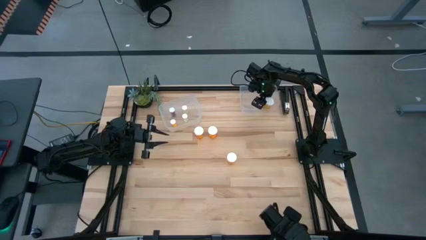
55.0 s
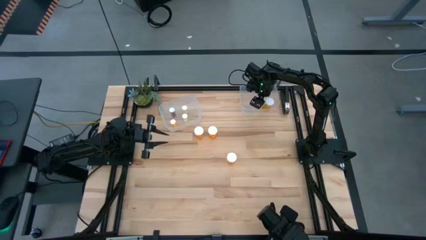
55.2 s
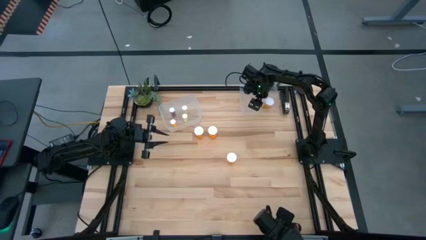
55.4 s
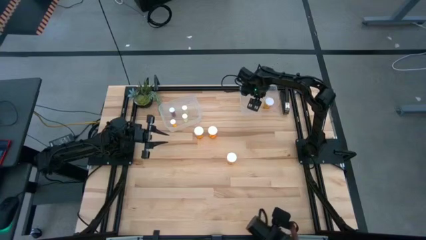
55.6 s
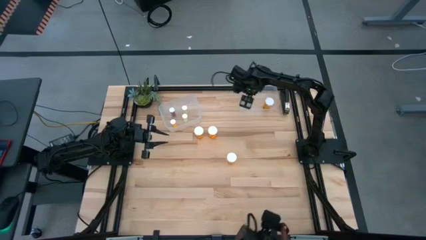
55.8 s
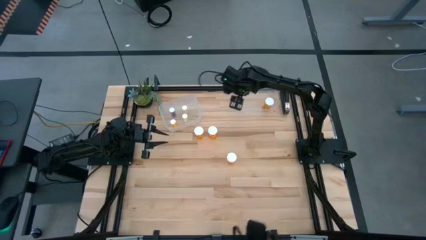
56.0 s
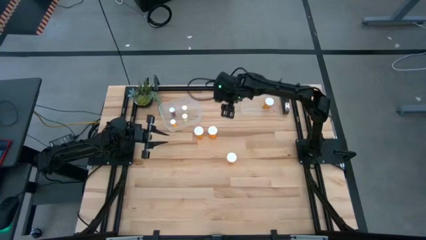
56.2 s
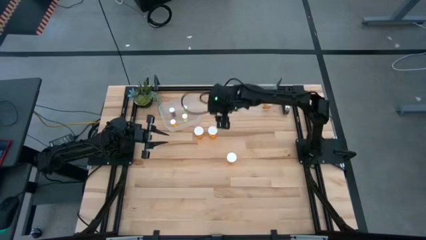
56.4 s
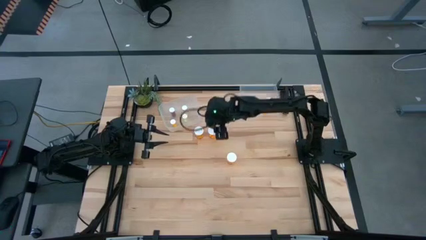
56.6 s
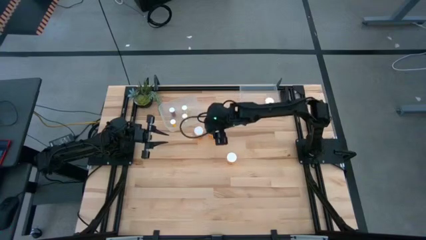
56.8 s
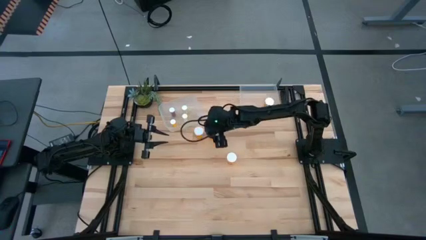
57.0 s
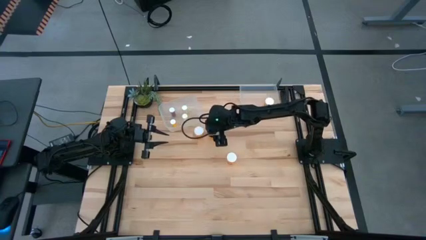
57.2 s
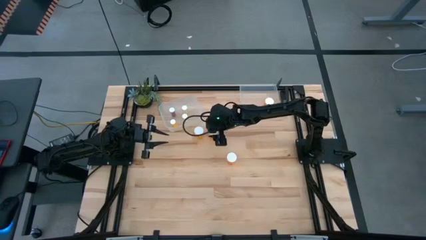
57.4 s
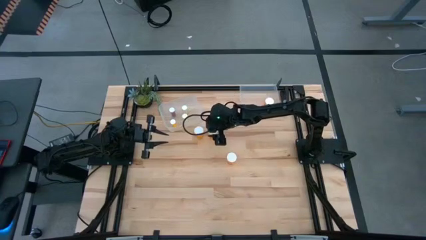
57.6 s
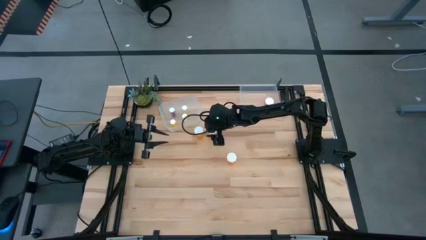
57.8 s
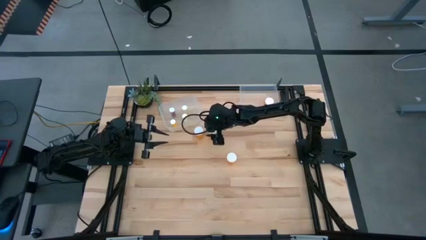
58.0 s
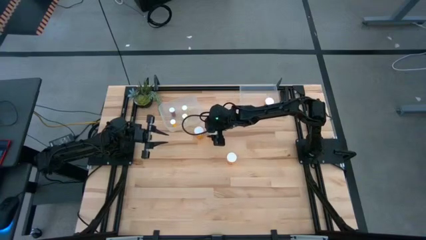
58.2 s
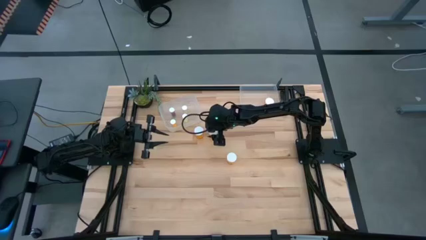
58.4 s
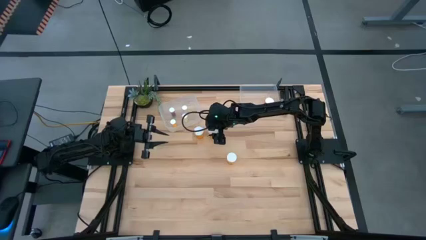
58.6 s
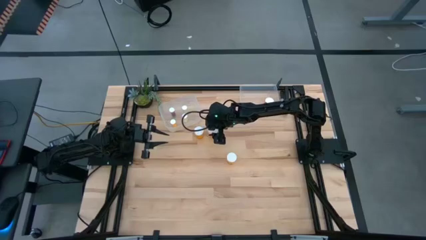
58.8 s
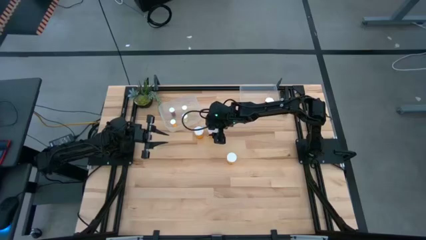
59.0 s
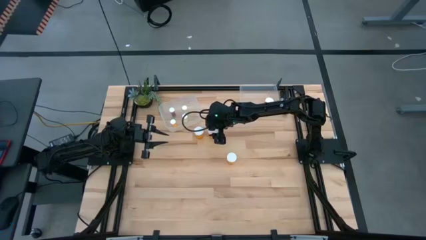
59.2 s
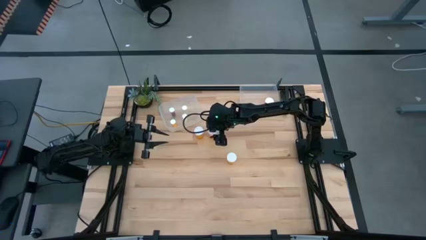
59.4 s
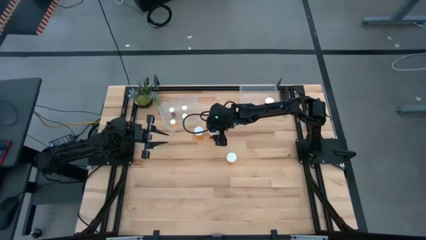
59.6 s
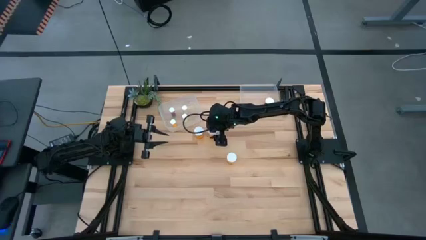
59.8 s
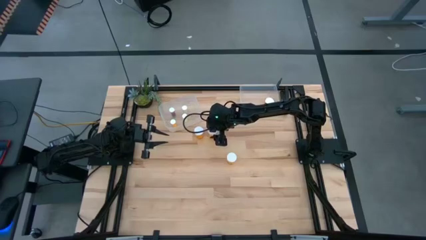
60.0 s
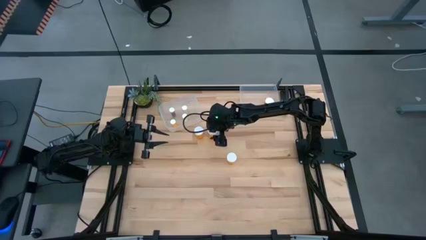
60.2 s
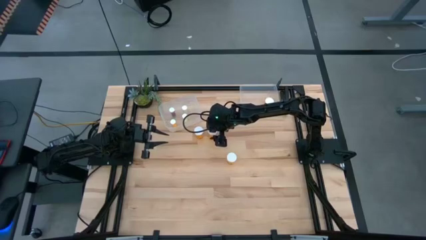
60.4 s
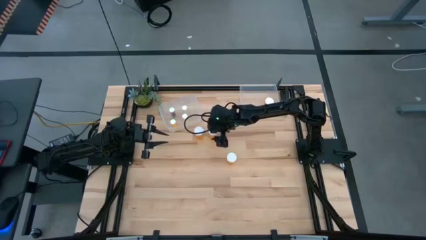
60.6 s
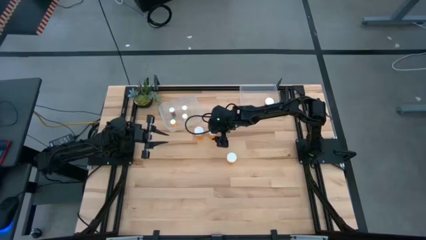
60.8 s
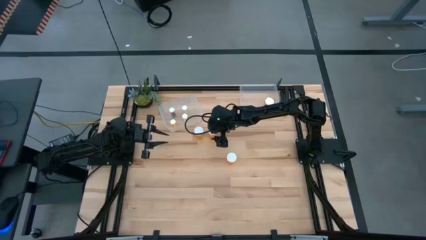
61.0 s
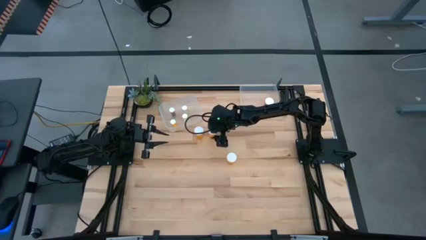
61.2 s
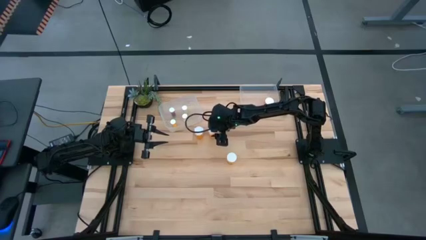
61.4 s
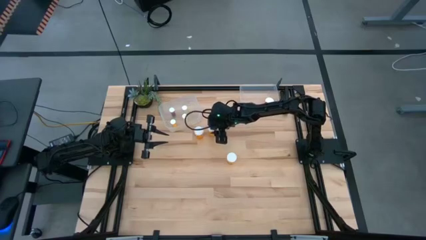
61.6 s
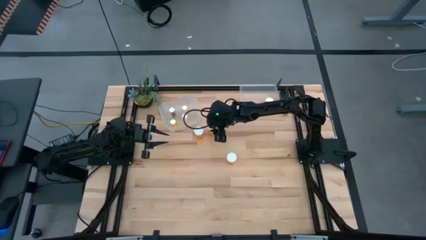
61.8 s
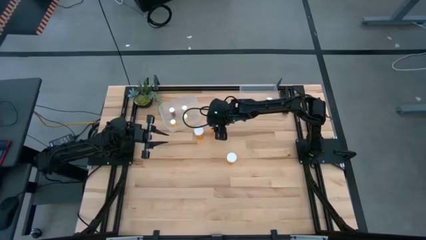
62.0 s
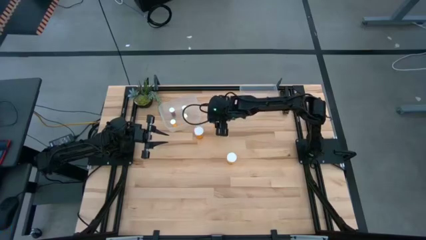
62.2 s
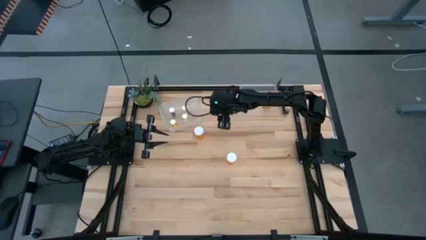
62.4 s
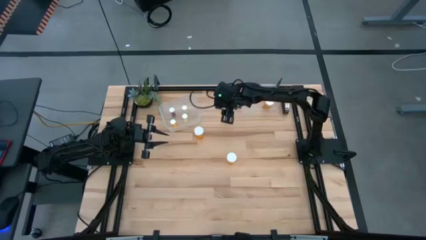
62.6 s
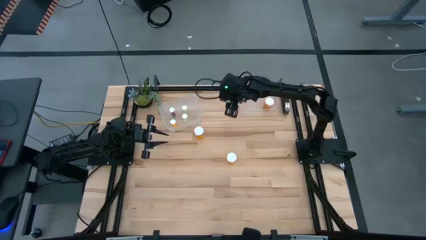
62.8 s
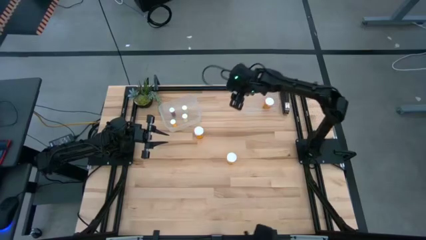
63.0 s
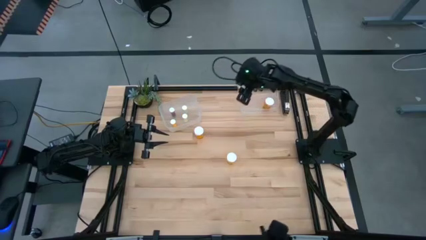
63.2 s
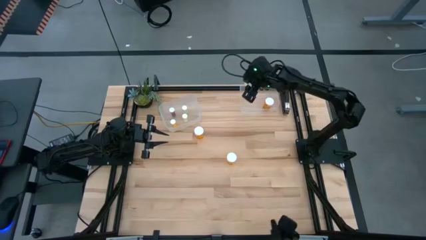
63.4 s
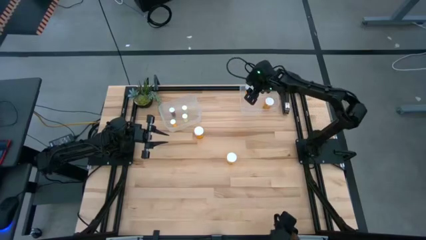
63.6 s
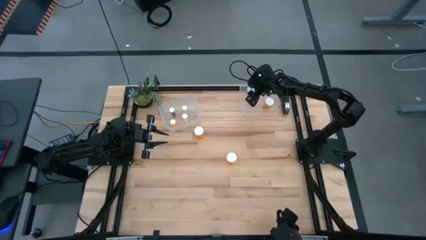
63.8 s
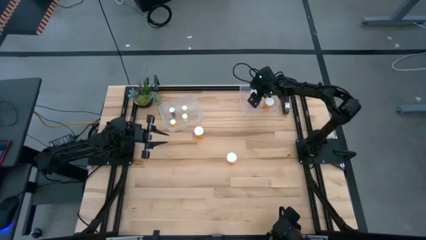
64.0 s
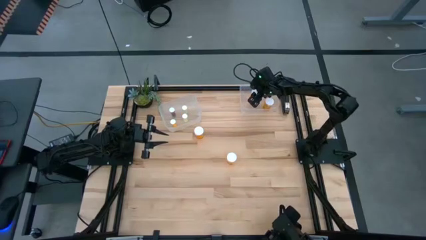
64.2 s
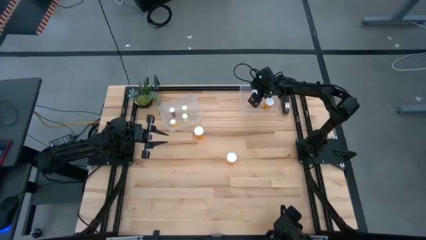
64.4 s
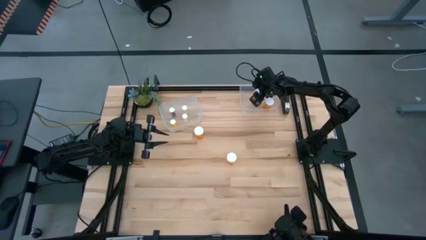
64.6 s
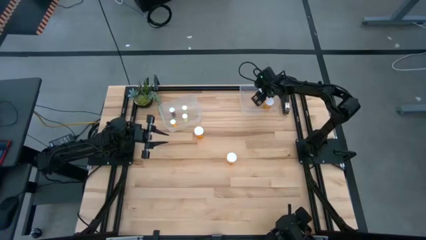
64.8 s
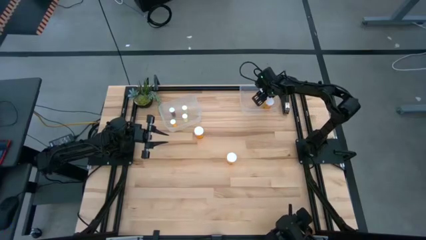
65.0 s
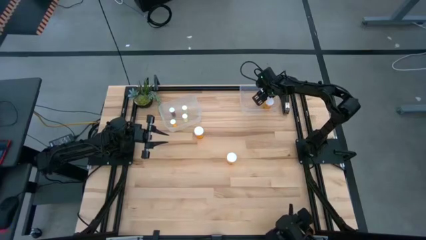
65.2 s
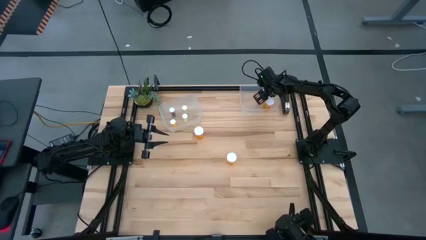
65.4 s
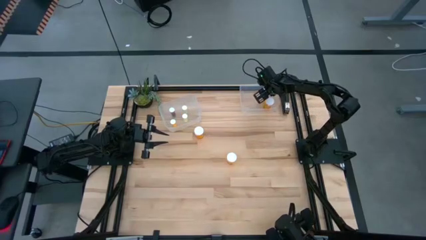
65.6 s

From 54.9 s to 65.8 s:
Task: Pick and place medicine bottles into bin by pill shape (circle, oval)
Put the orange large pill bottle into the right transparent bin

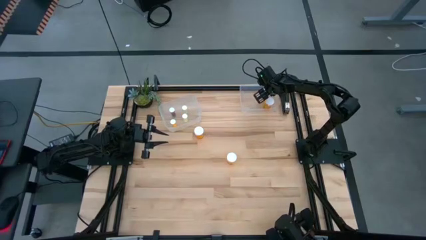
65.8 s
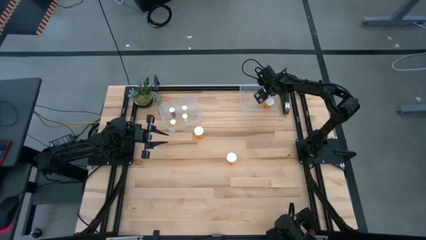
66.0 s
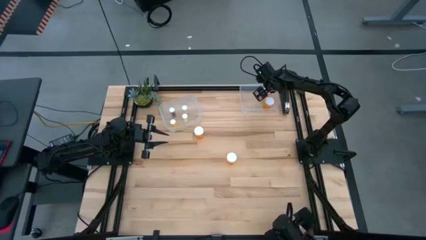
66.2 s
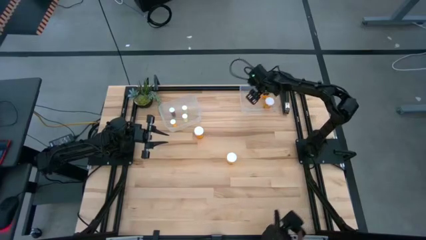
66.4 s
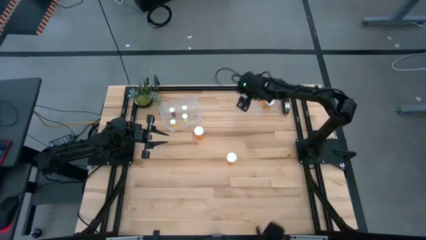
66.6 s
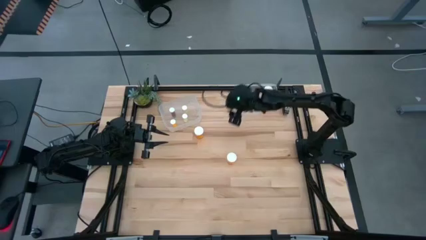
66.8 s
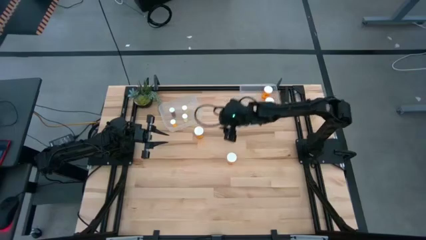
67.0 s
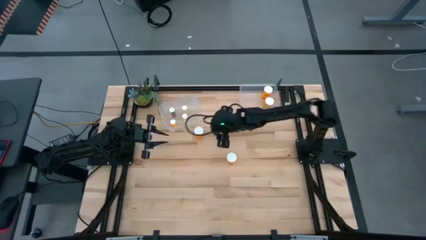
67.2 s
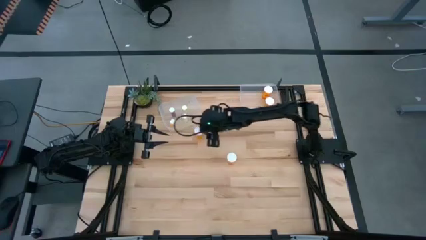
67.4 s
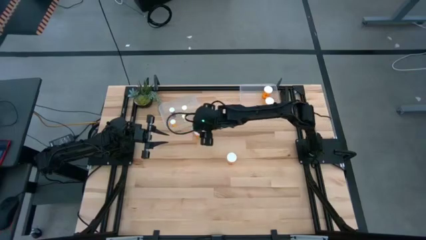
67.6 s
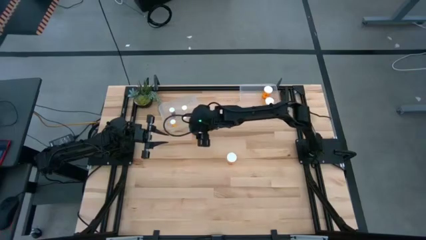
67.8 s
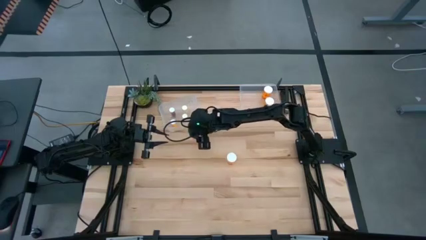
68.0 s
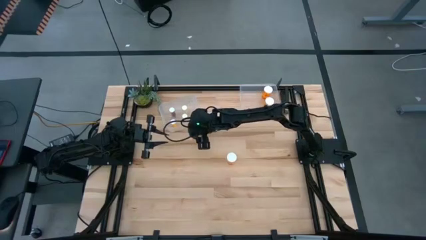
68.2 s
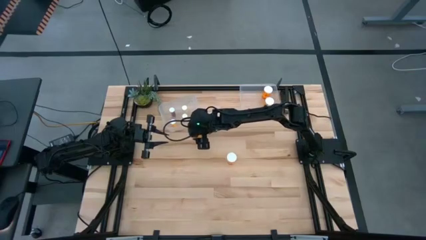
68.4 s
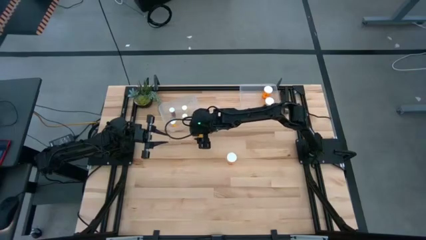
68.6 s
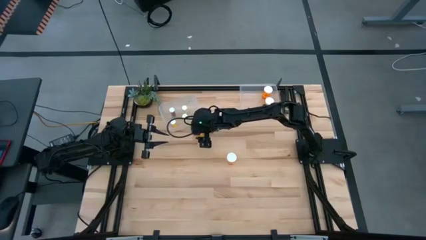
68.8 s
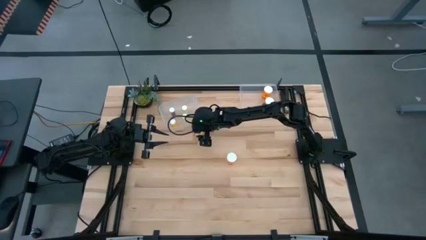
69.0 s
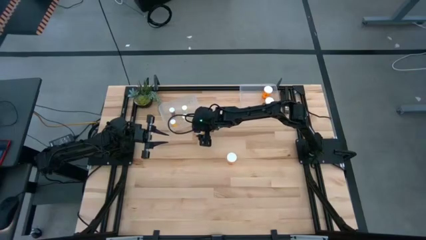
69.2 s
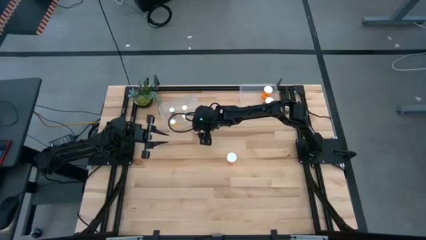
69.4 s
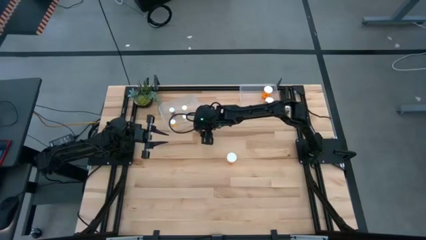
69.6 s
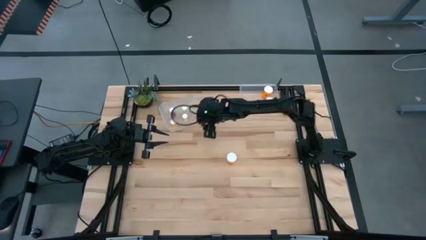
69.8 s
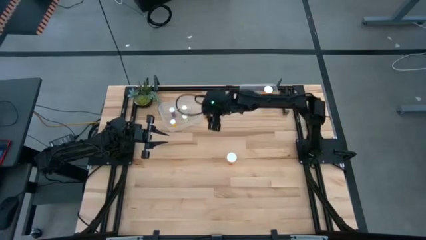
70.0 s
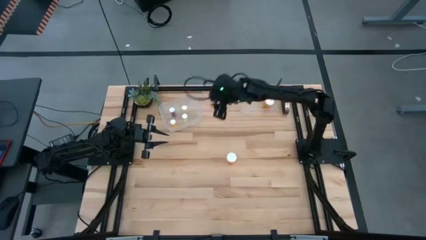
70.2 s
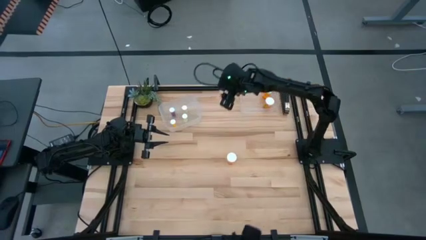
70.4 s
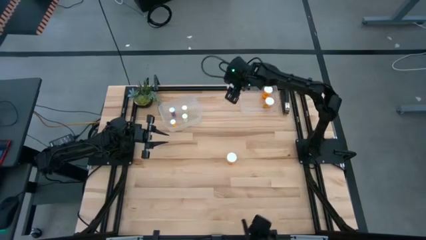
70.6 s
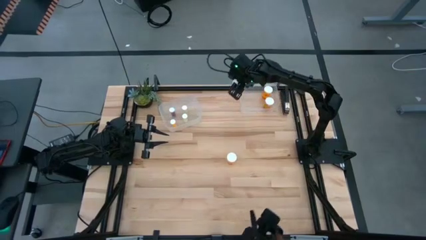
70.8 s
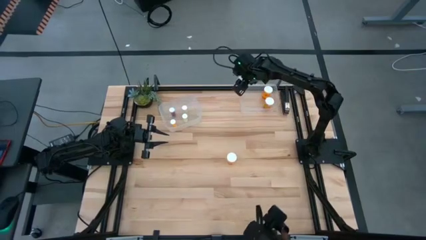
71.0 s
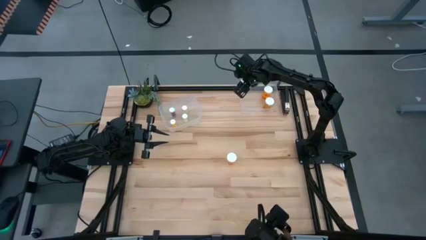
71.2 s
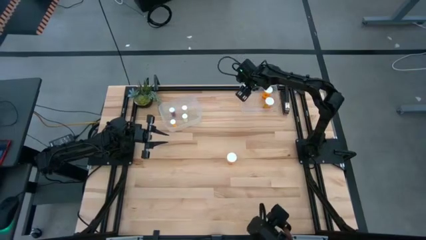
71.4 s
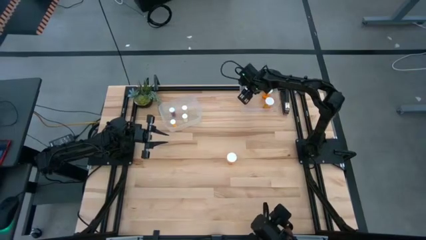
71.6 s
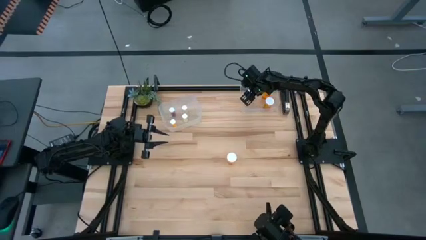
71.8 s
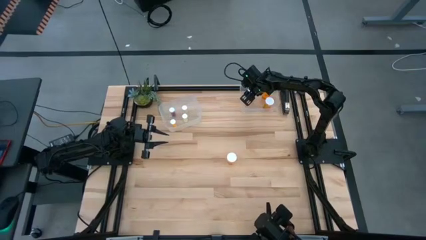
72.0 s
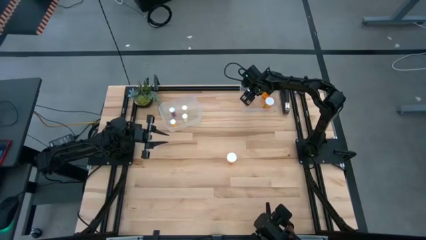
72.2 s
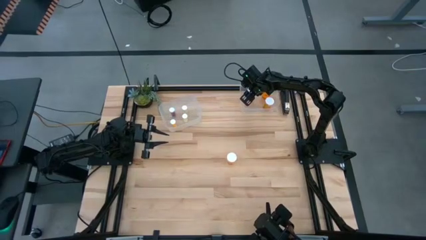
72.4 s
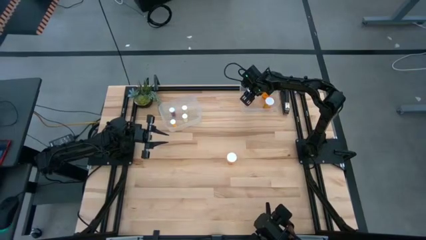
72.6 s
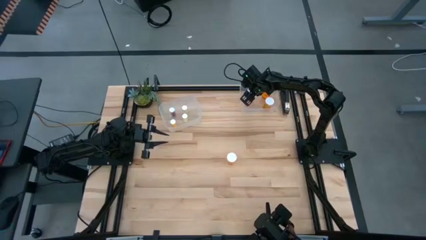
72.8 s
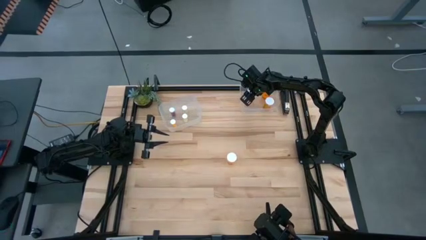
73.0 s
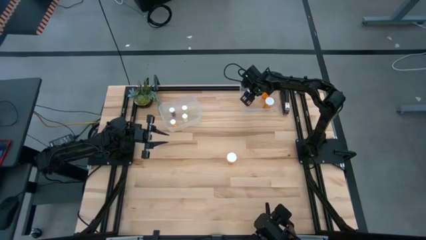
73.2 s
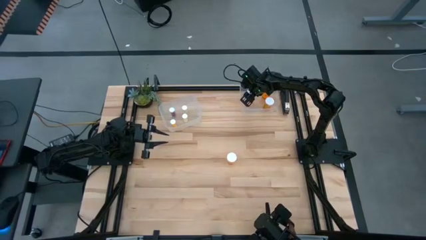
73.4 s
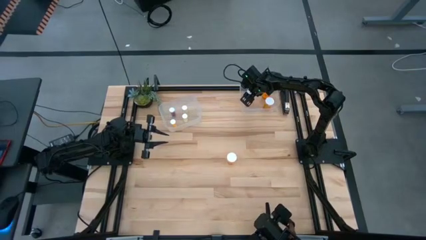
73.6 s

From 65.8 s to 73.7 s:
Put the orange large pill bottle into the right transparent bin
